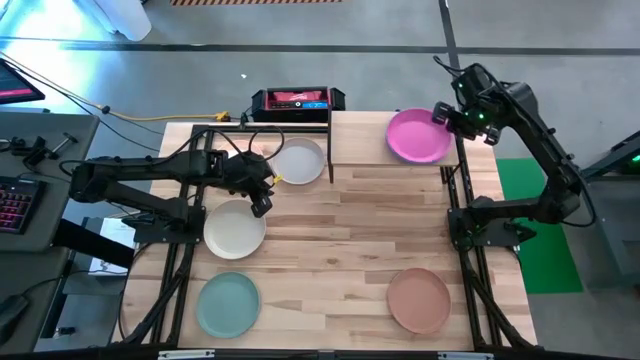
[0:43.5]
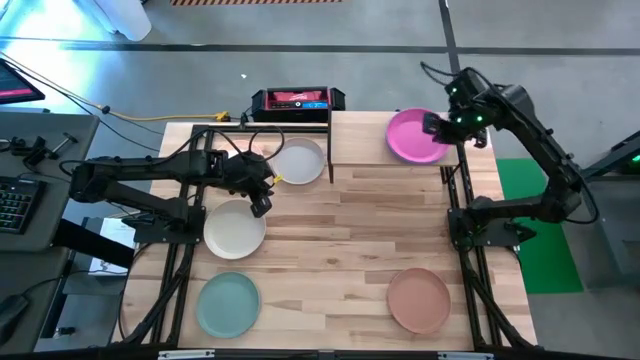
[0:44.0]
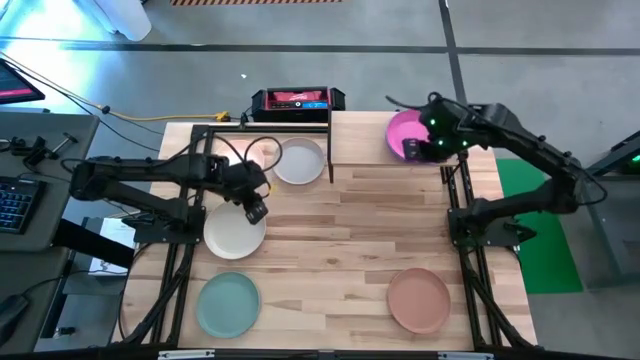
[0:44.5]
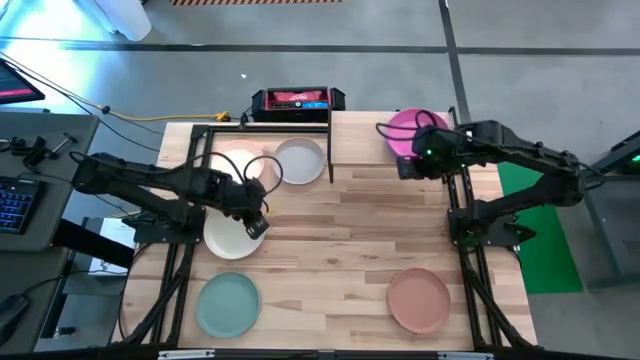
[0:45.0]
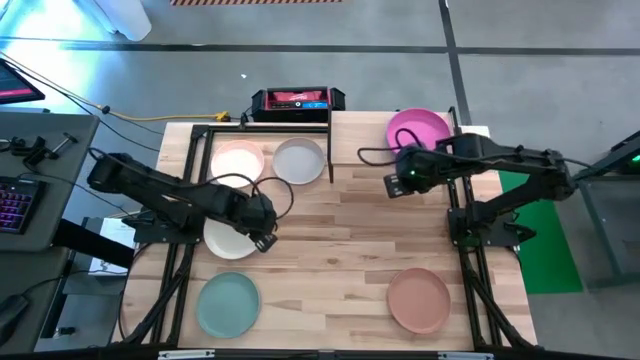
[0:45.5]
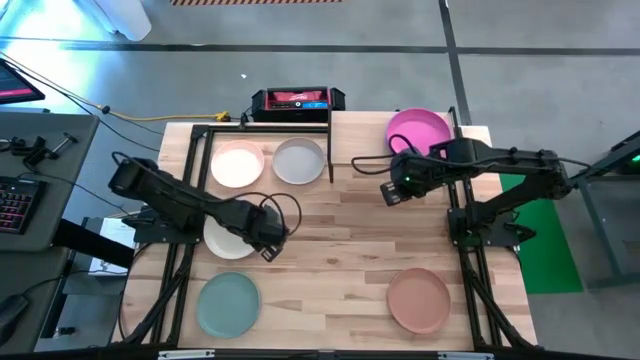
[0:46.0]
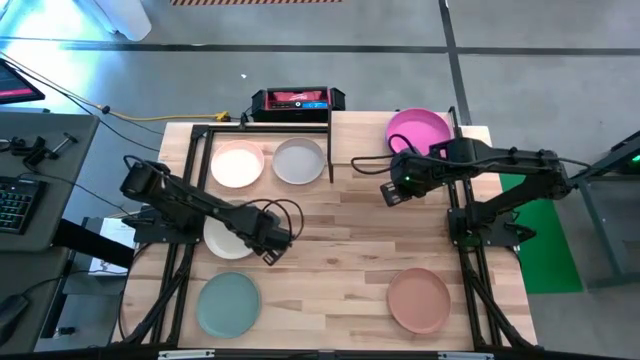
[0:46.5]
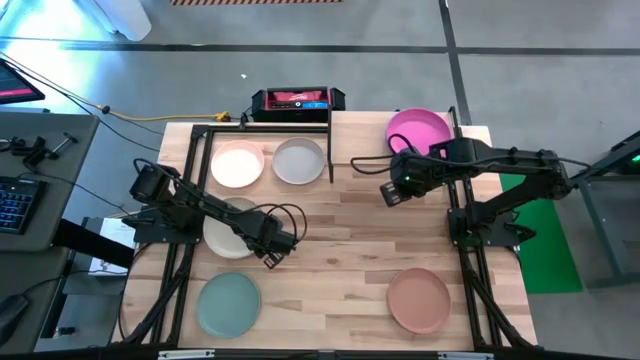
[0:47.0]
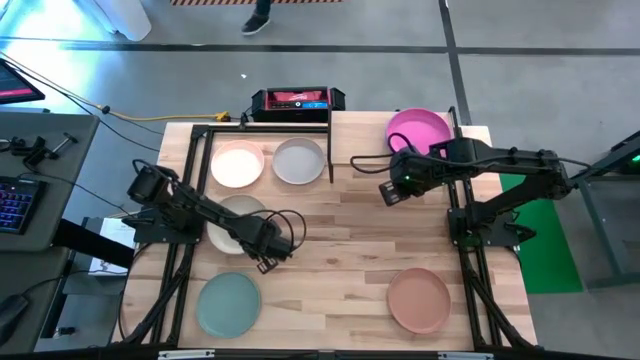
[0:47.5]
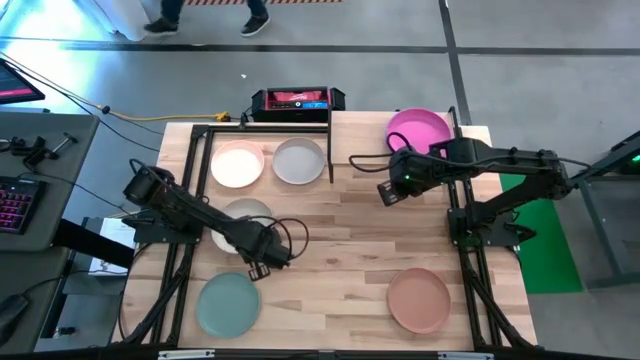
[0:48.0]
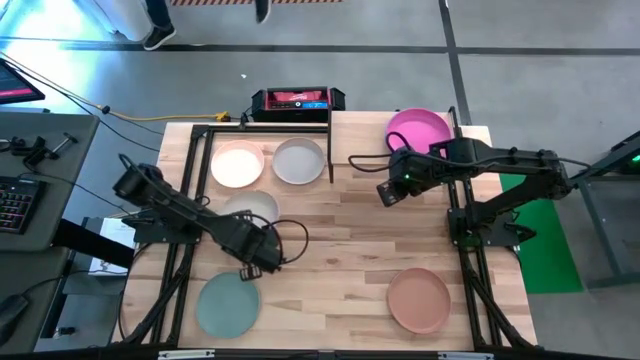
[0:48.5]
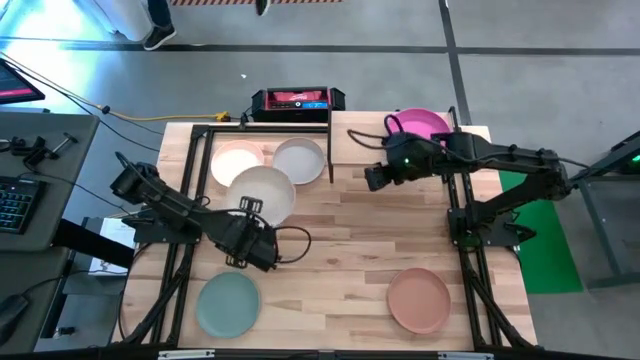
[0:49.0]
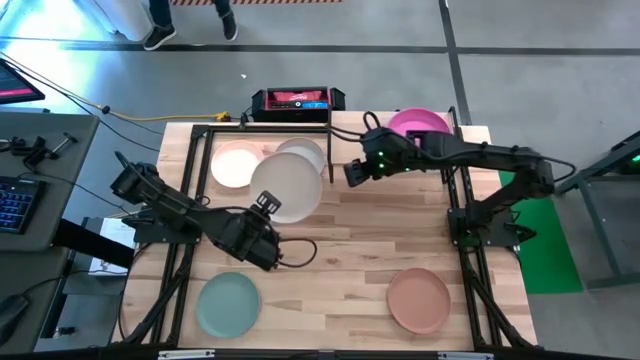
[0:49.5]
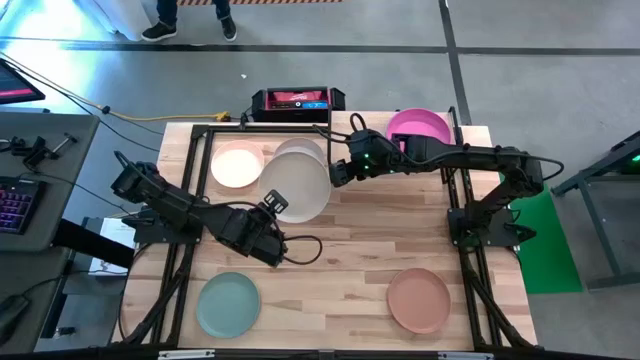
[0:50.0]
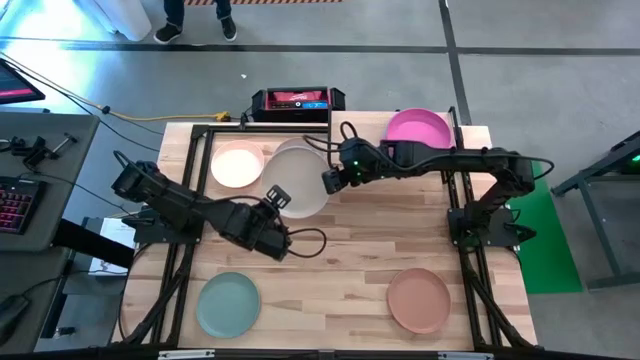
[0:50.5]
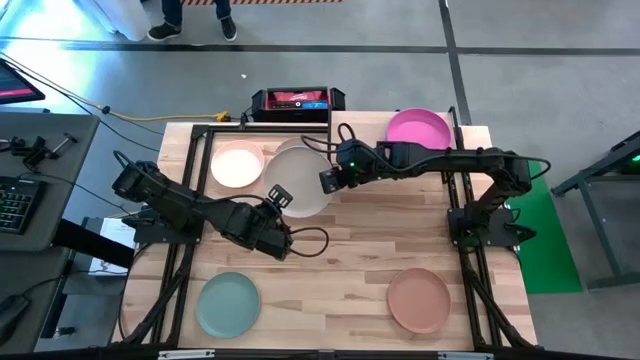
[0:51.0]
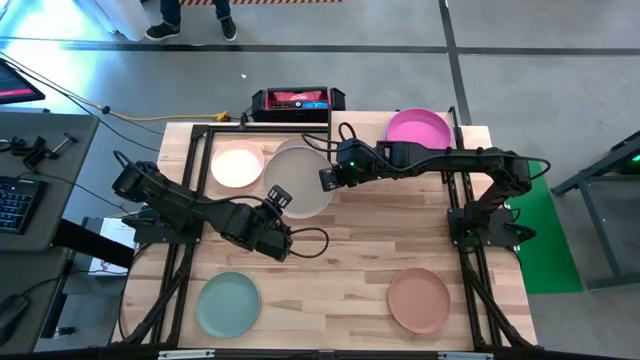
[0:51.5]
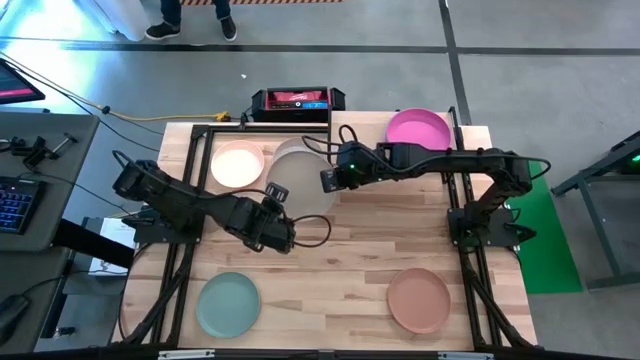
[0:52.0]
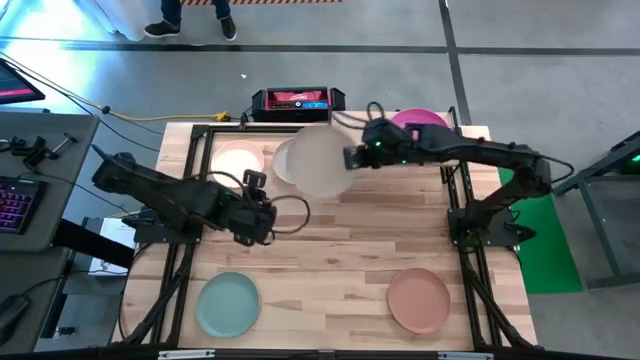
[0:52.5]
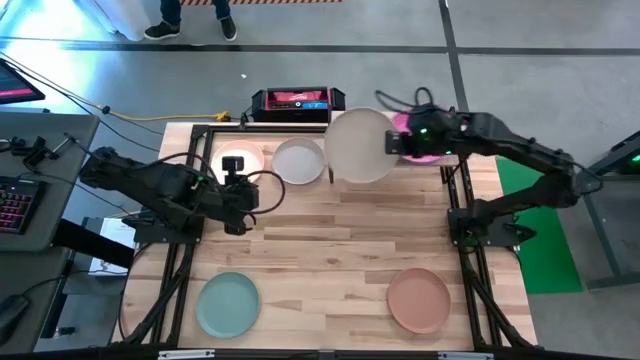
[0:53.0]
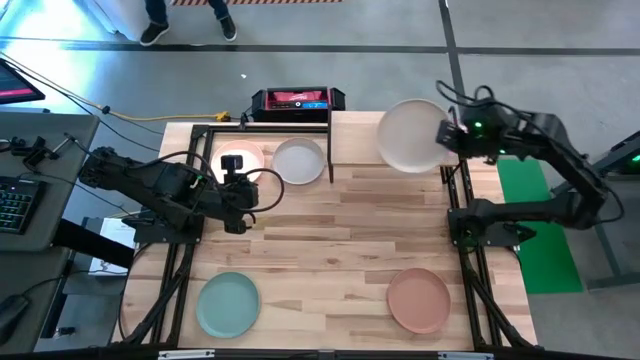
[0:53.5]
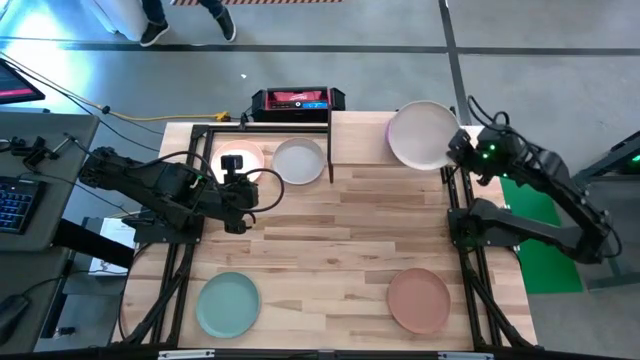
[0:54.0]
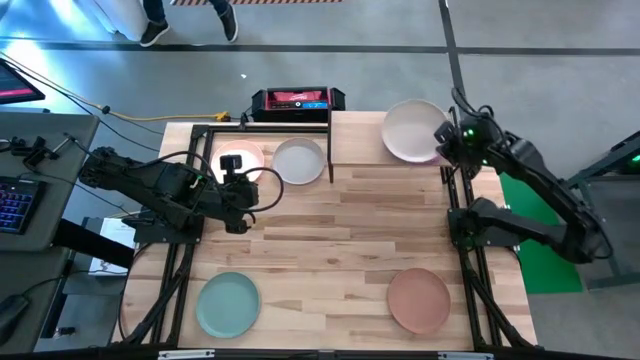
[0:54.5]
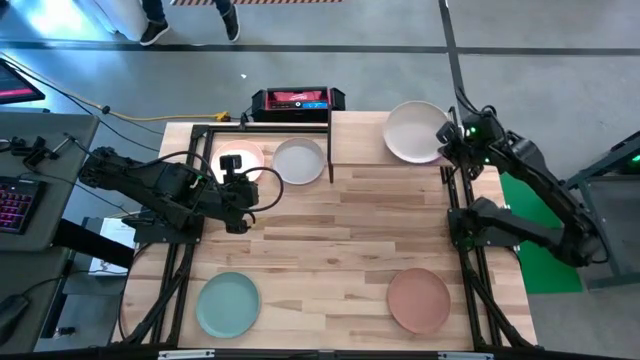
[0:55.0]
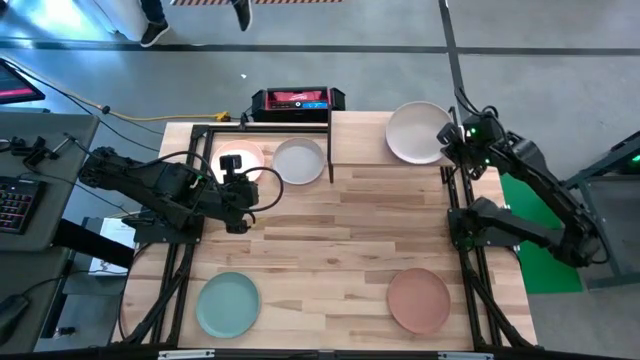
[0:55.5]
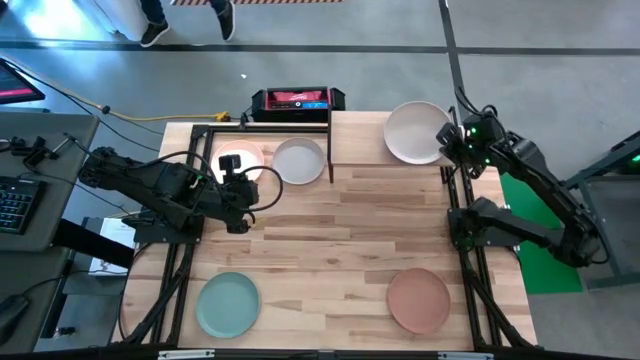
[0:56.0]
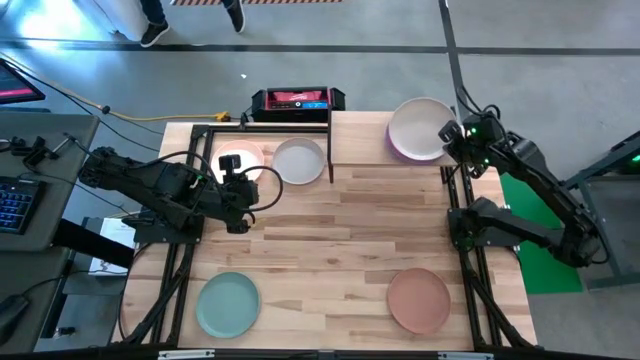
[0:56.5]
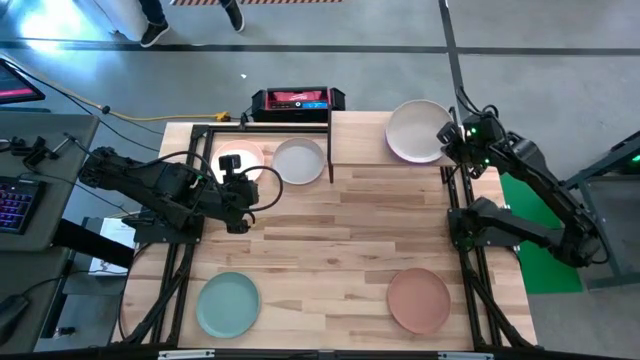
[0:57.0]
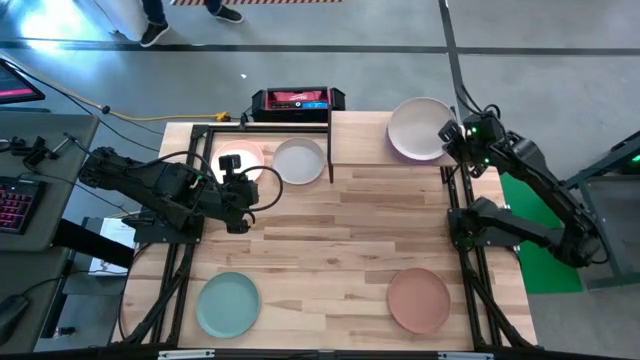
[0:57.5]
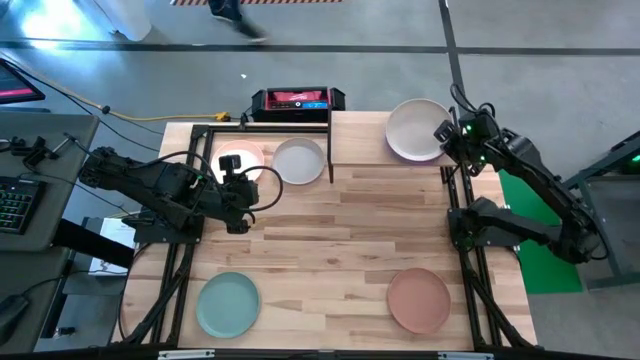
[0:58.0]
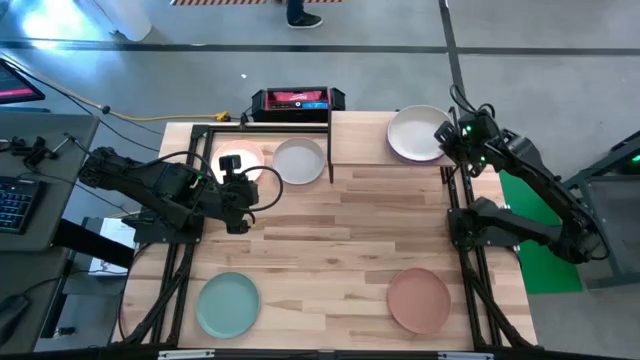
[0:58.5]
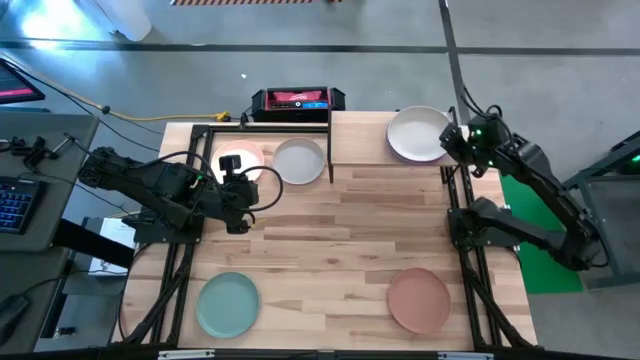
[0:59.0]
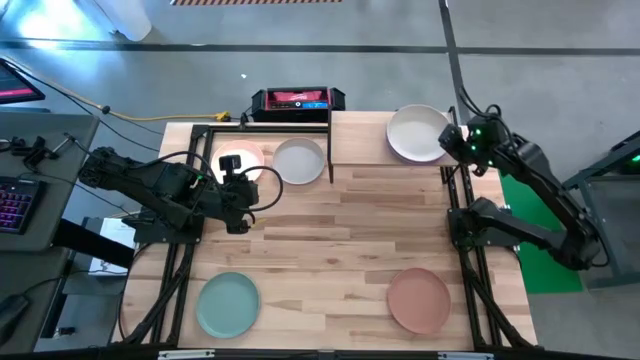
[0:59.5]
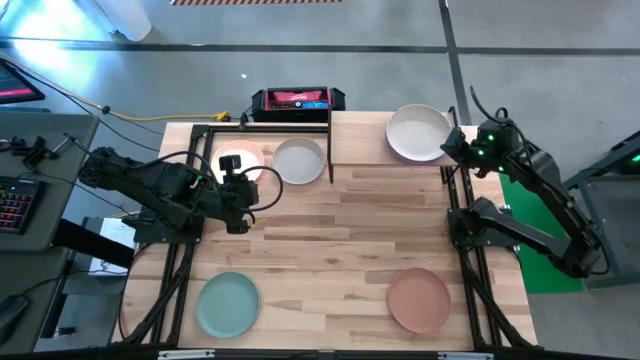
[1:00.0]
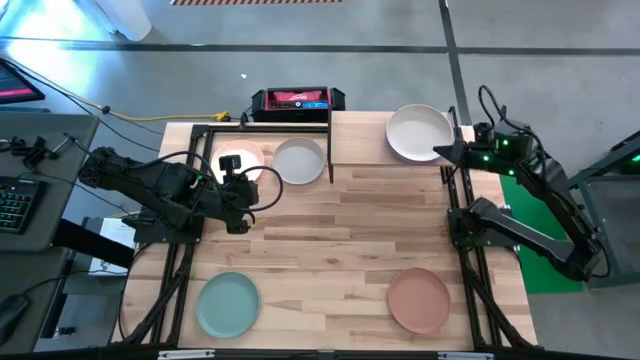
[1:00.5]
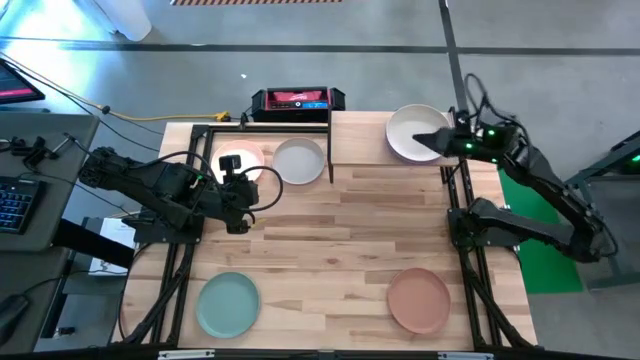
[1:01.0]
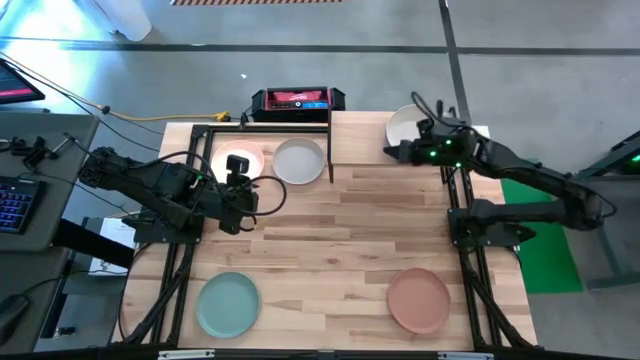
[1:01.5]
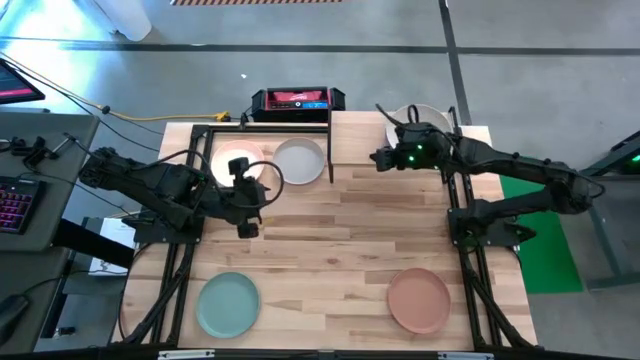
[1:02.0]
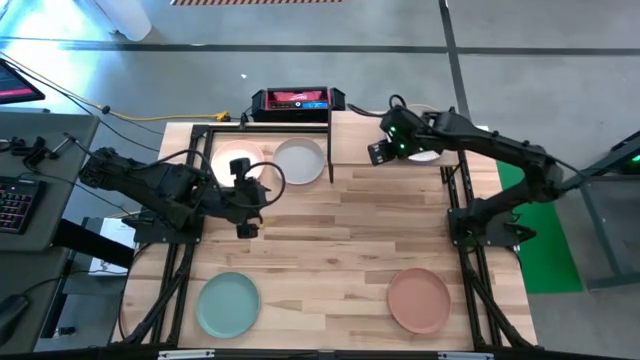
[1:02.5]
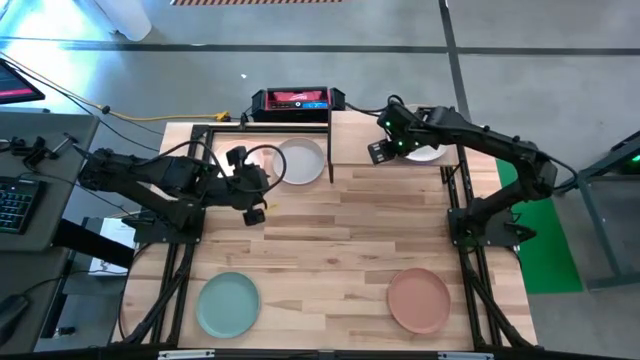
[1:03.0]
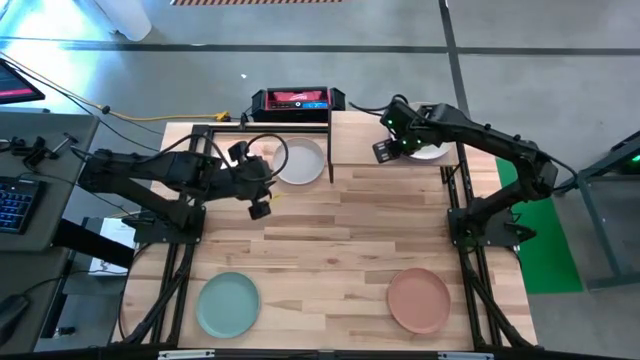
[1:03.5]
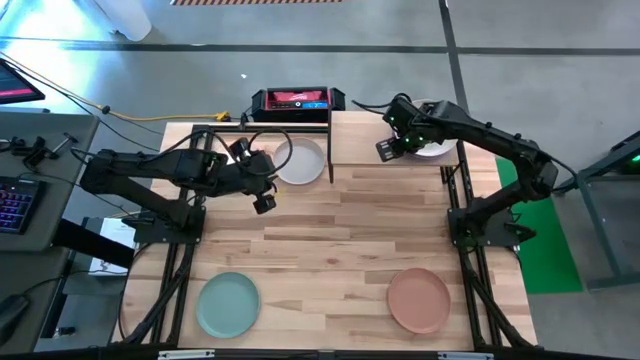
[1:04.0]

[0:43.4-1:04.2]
Task: Place and stack plates onto a shelf
Stack the white plate on top of the pink plate on the shelf

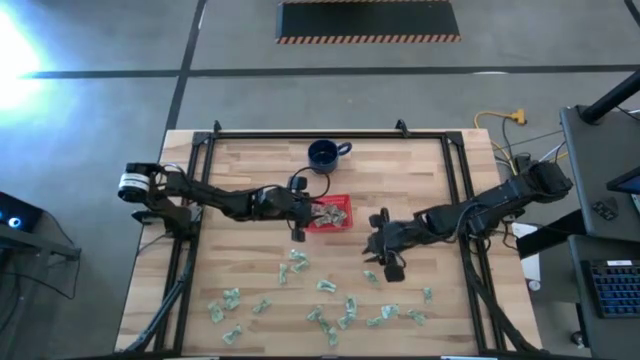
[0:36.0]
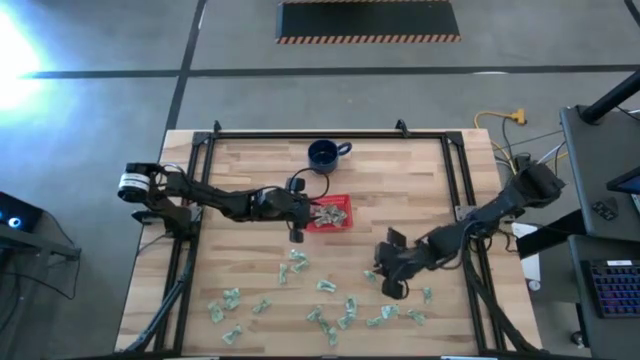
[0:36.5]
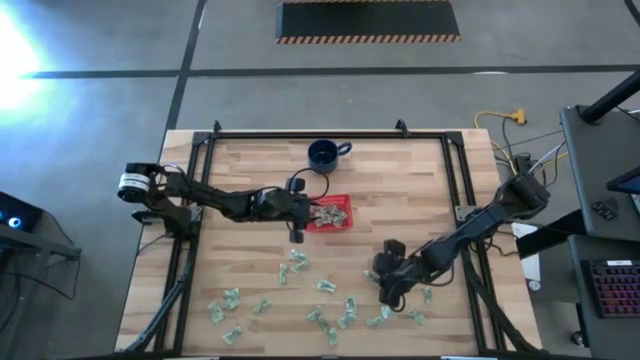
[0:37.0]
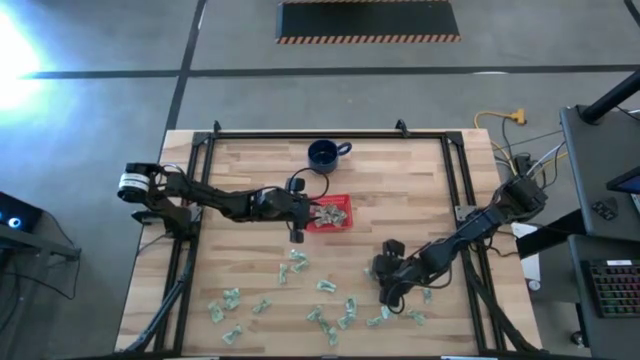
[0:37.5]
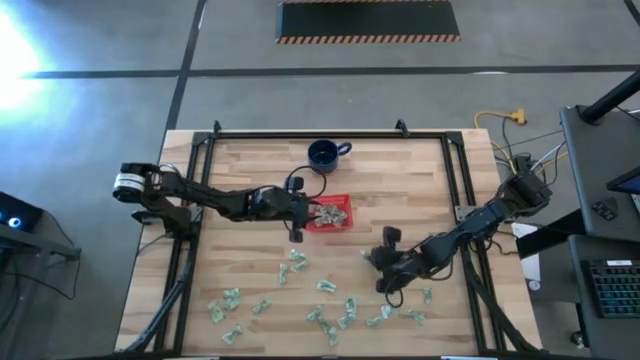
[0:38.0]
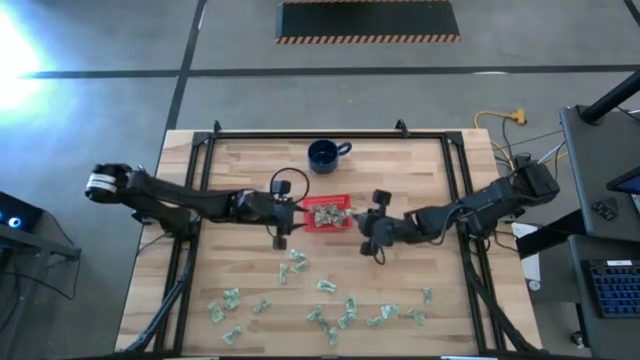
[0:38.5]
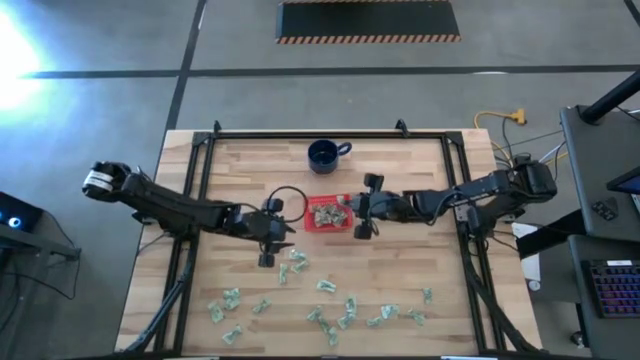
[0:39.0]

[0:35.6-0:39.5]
Task: Pick and place items into bin
Put the stevia packet into the red bin
